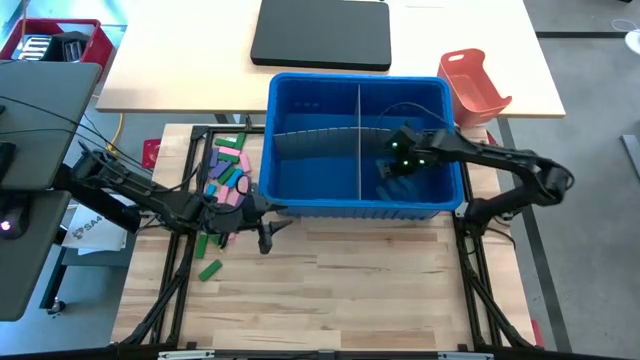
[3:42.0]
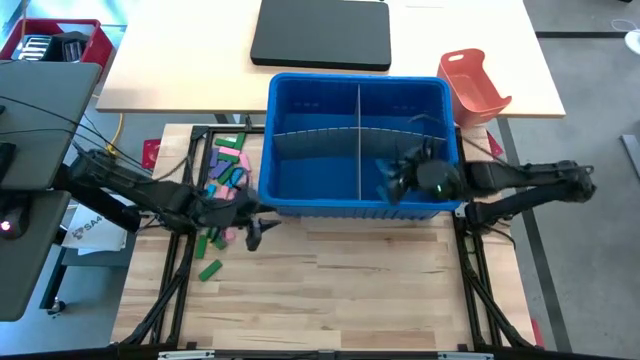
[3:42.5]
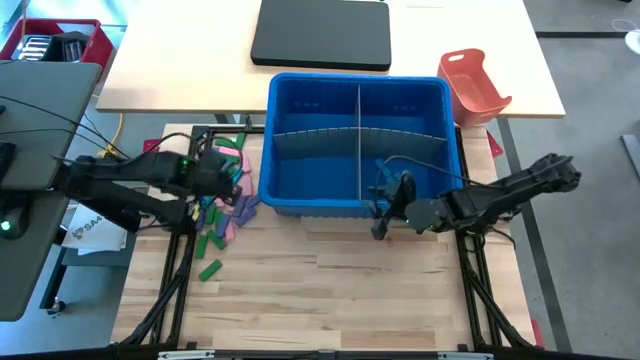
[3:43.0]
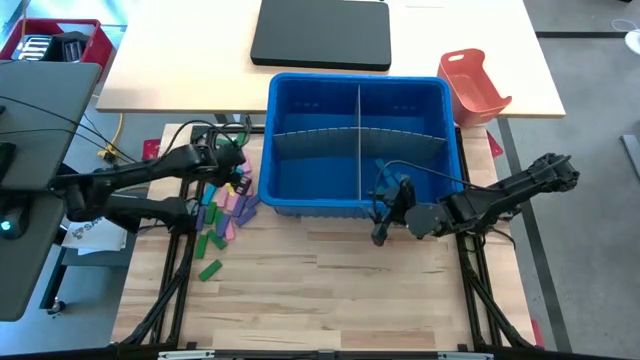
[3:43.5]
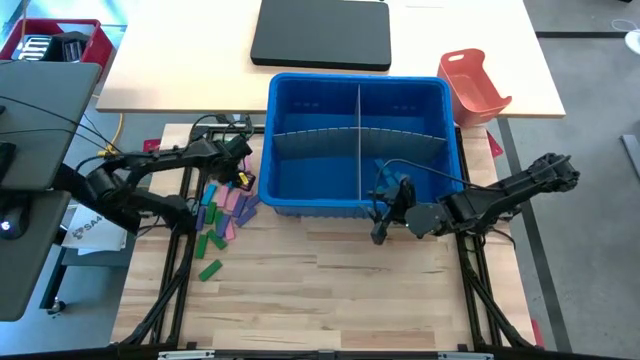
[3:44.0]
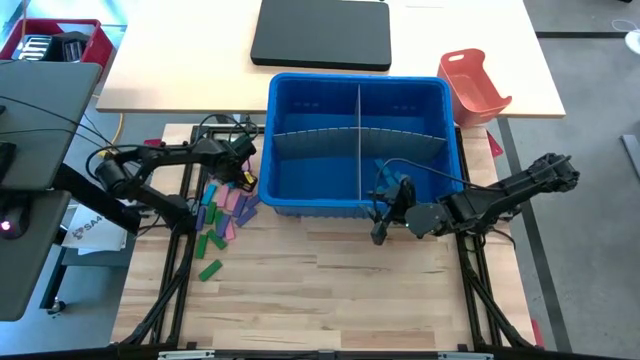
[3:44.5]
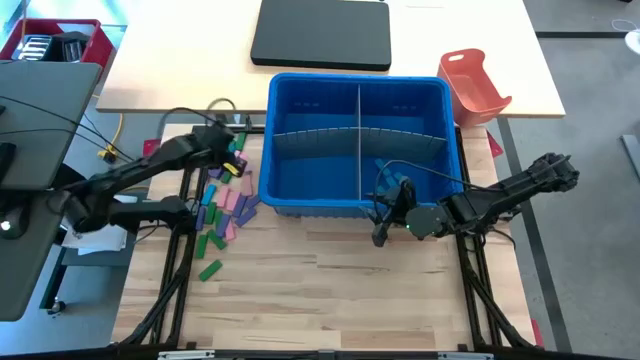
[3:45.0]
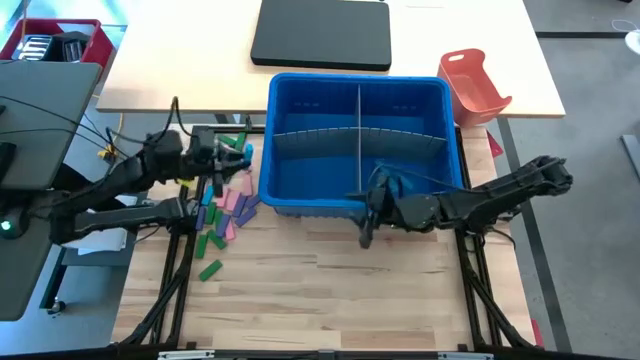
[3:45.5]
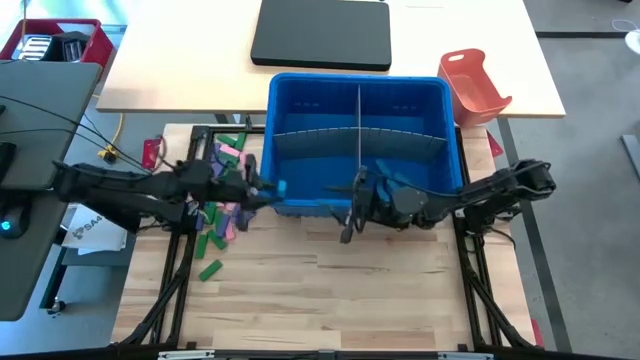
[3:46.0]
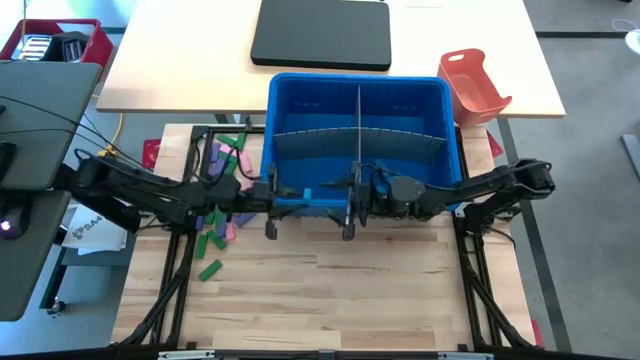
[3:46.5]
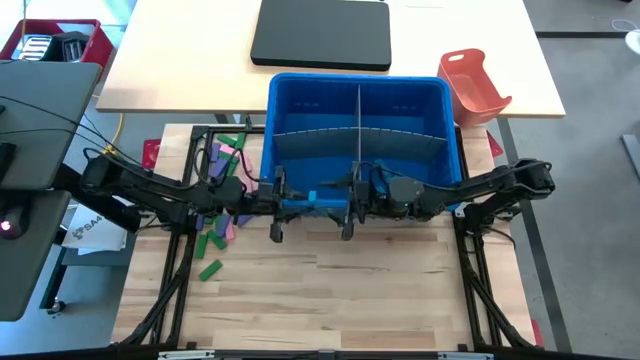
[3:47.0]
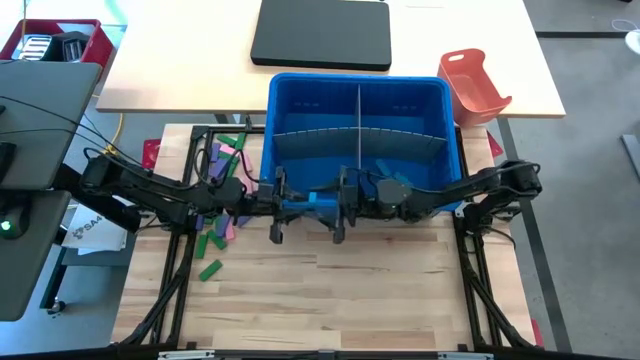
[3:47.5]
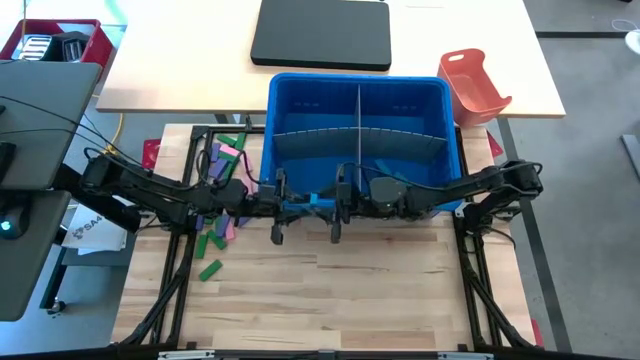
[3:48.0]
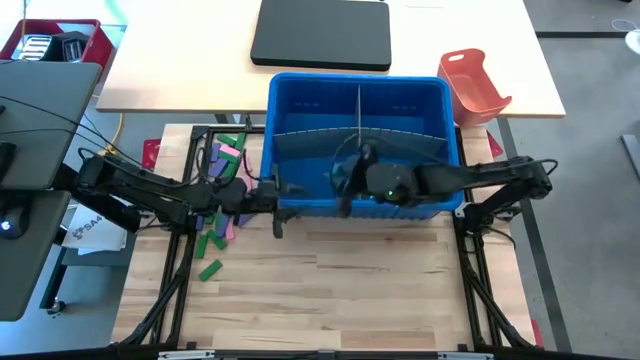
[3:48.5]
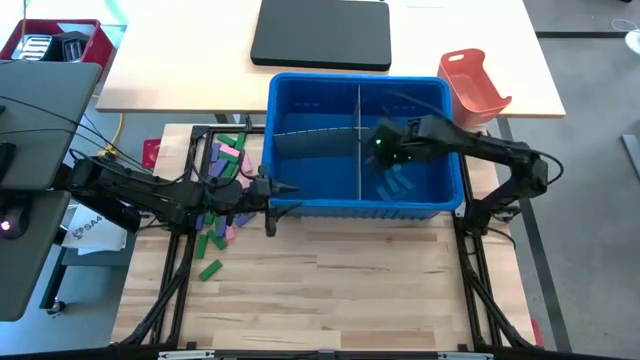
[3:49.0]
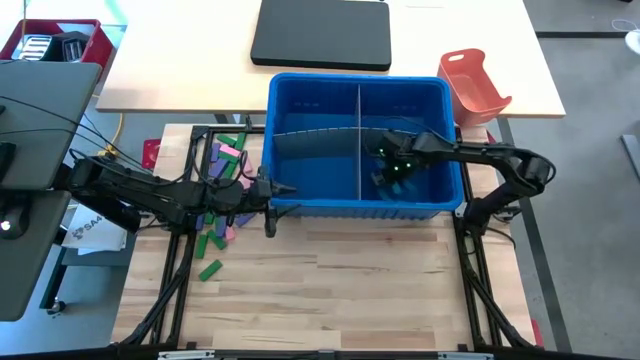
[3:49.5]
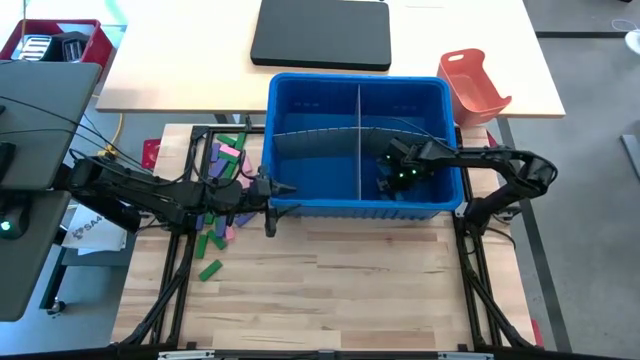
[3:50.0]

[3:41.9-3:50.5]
Task: Sort blocks
Put the blue block into the blue bin with the other blue block

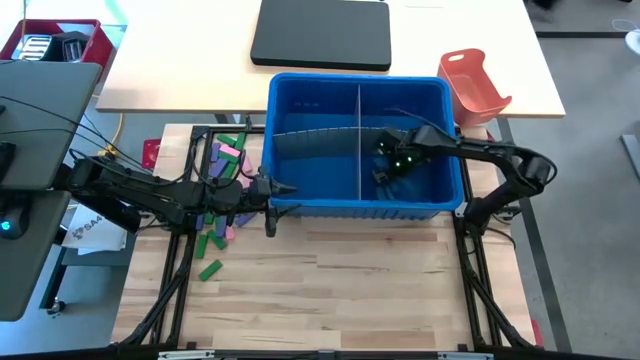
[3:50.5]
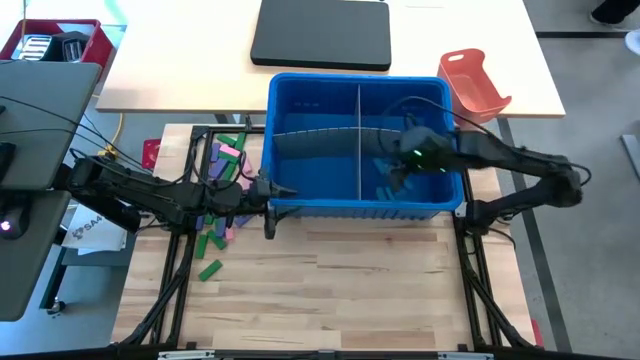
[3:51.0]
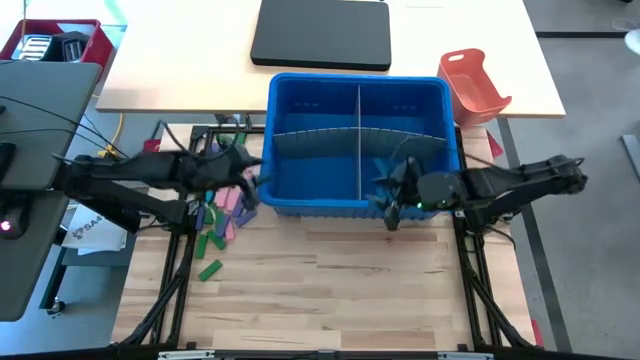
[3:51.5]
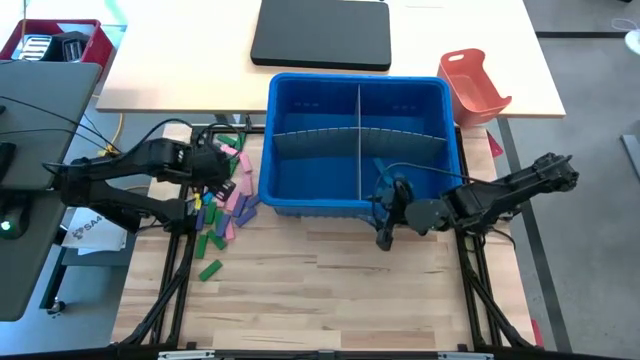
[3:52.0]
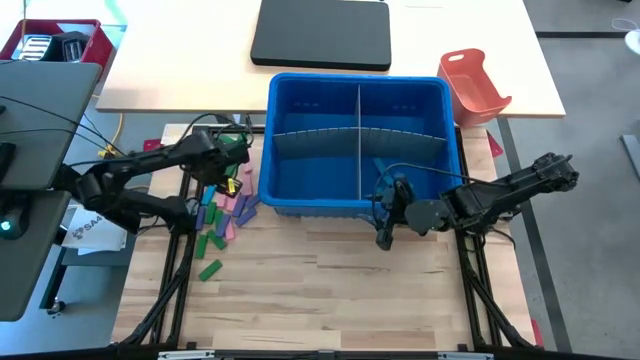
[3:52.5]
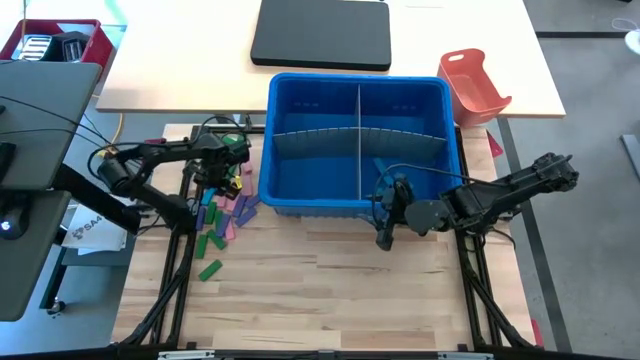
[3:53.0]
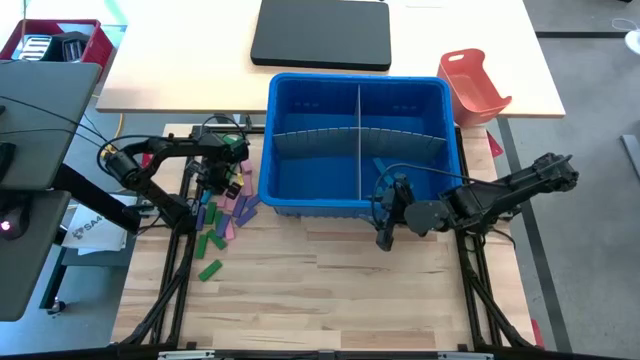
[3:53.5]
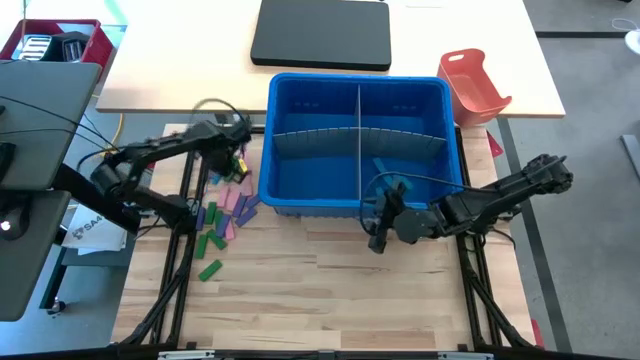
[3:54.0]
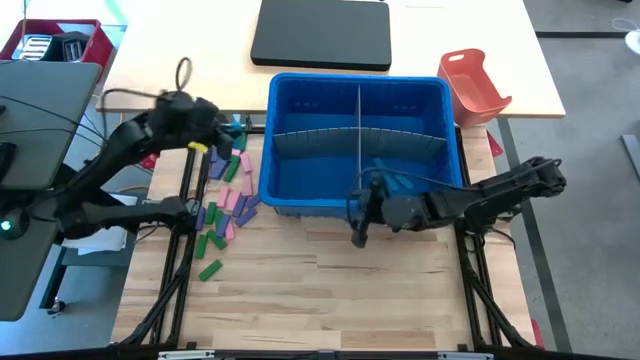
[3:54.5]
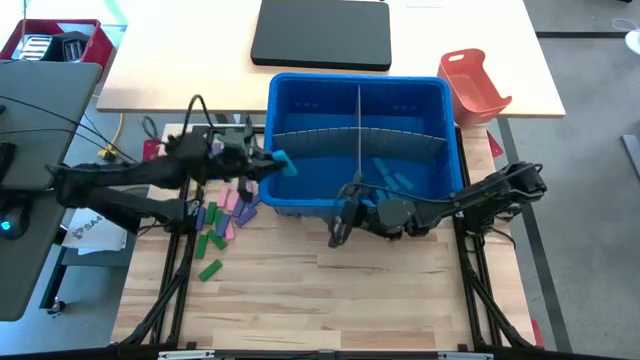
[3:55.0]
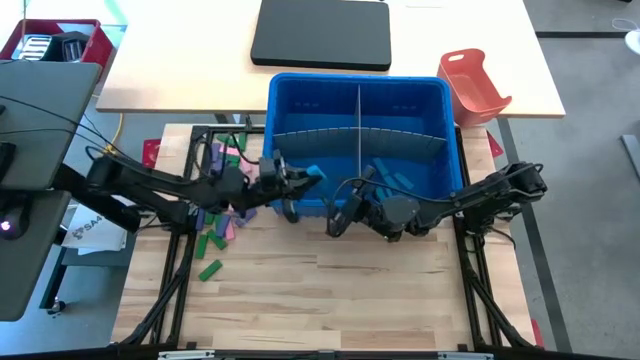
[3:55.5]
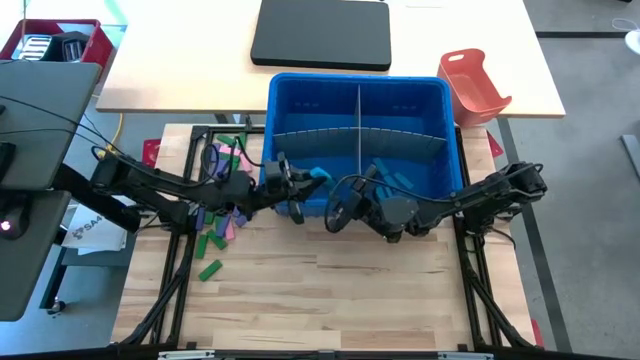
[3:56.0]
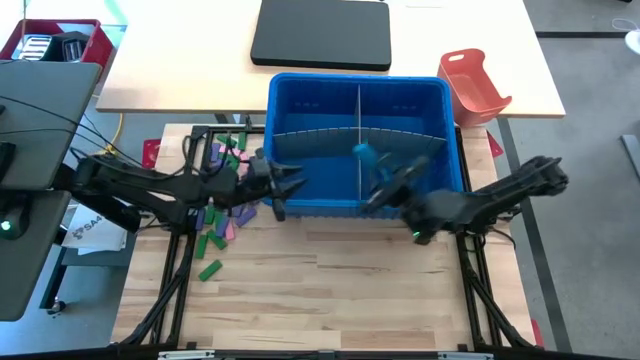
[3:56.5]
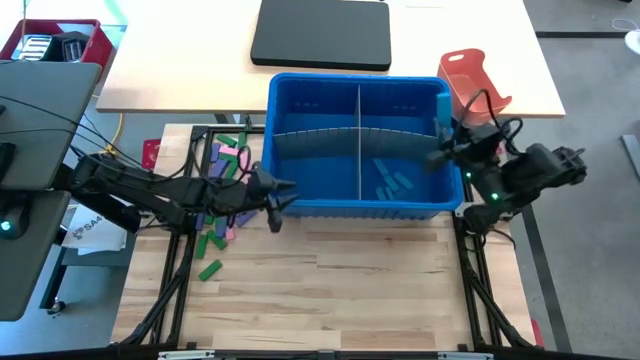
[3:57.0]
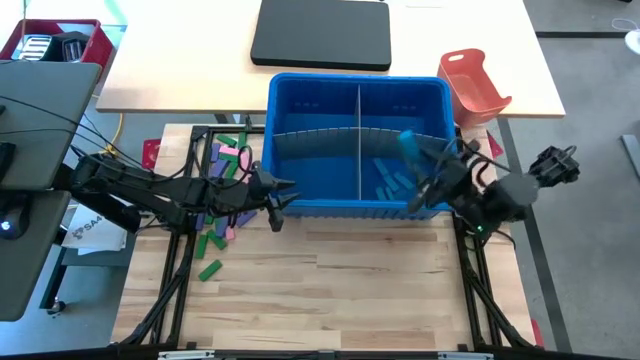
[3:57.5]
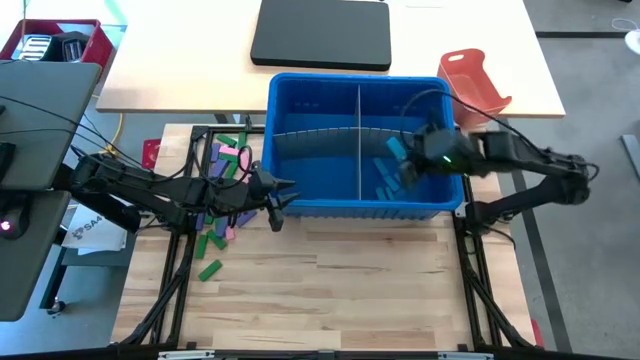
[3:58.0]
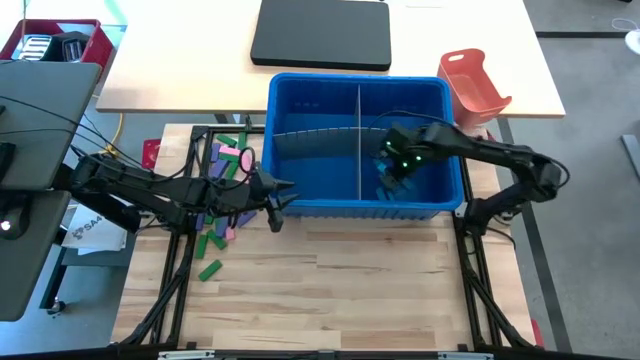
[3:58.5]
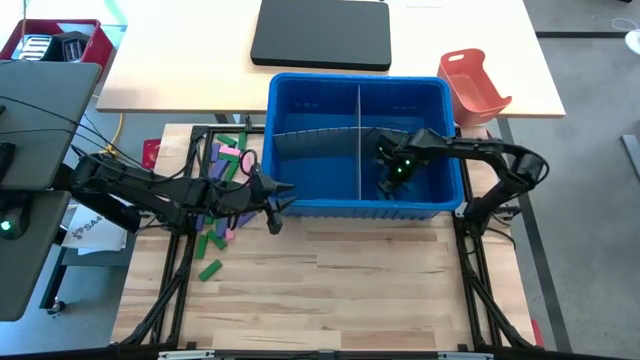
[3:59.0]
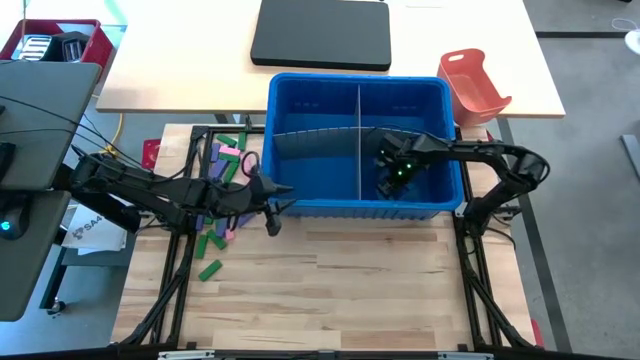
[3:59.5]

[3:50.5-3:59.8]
Put the blue block into the blue bin with the other blue block

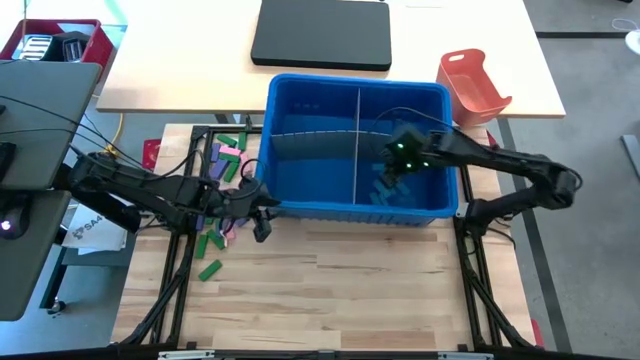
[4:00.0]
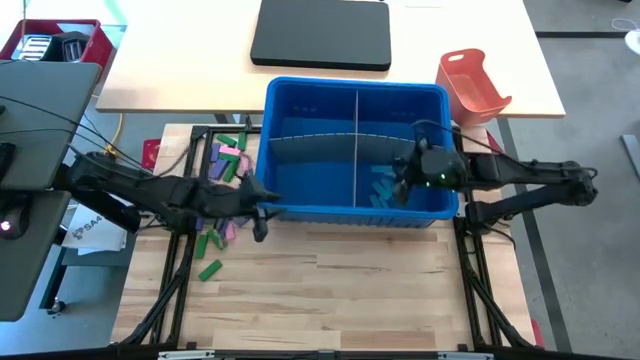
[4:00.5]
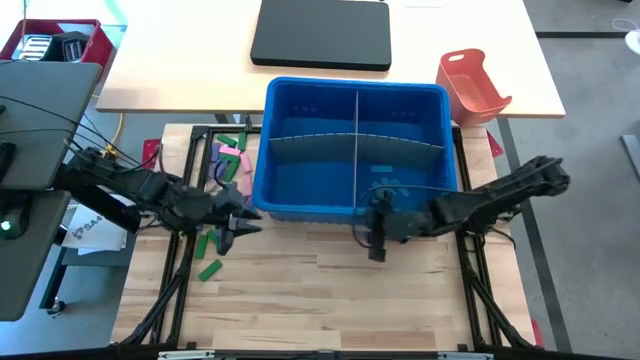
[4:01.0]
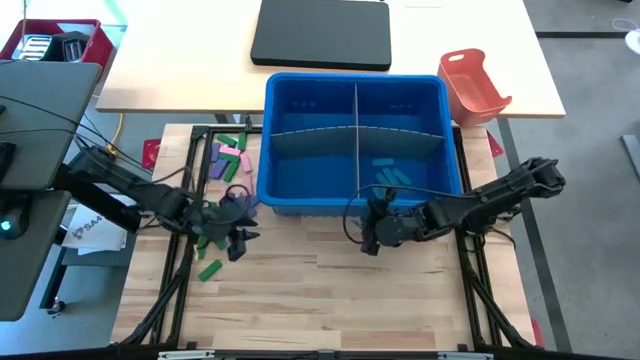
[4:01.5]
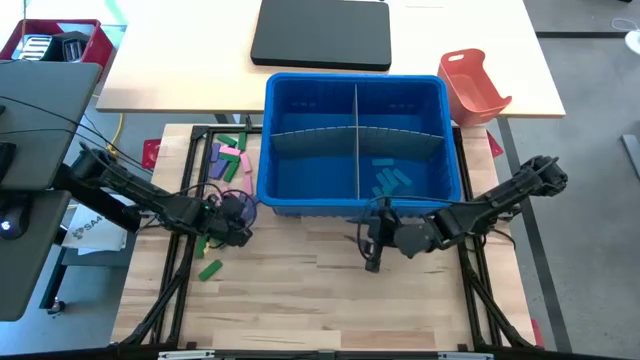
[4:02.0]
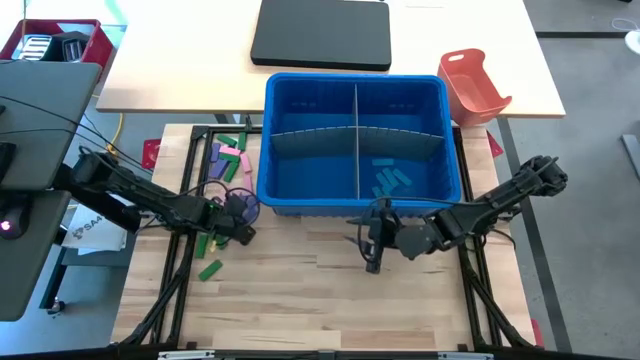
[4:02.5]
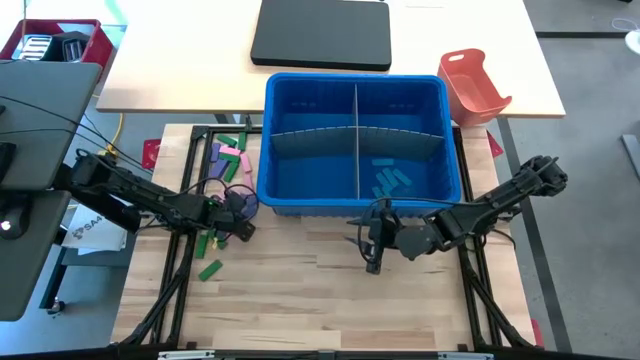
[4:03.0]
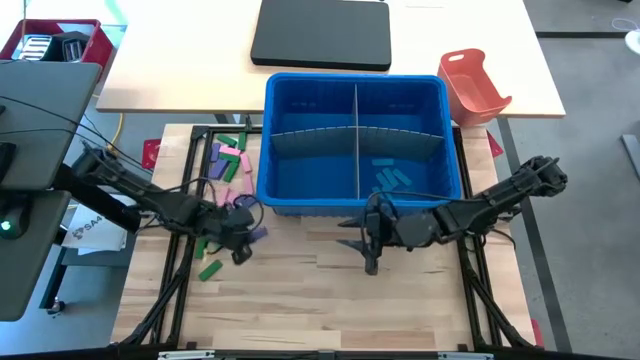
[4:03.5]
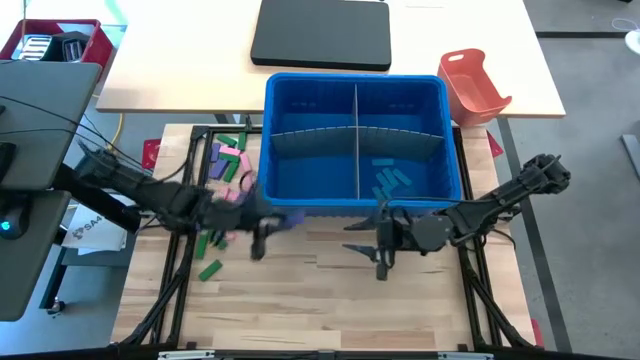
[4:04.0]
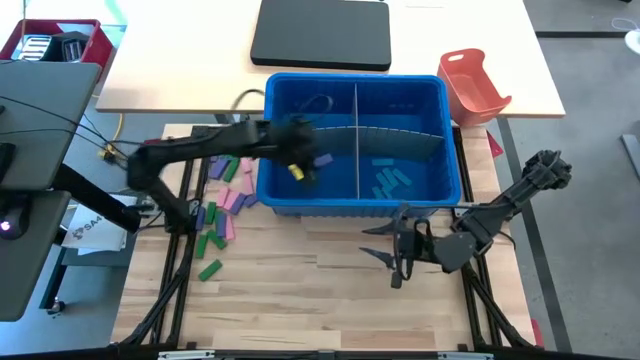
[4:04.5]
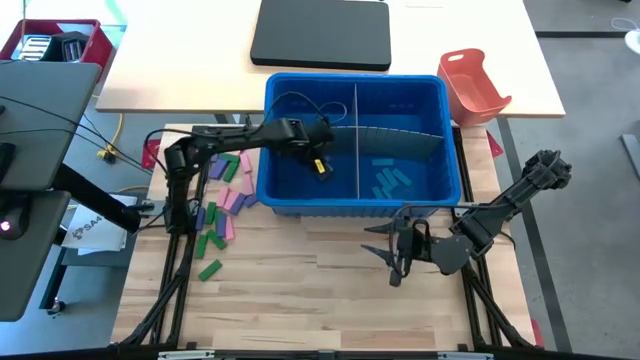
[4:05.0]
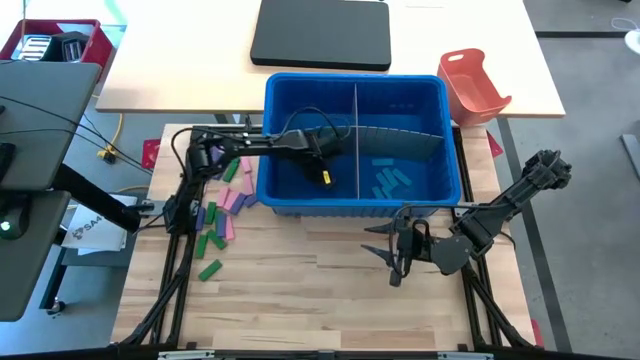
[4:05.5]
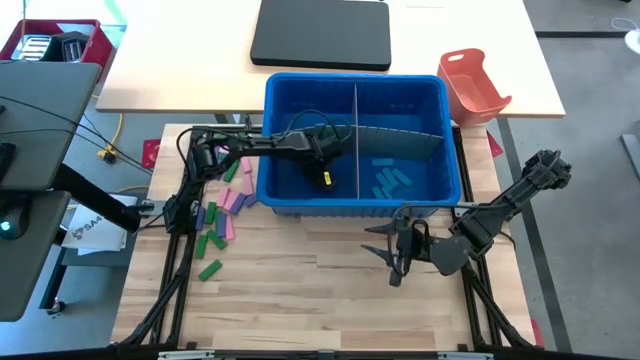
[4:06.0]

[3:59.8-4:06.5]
Put the purple block into the blue bin
